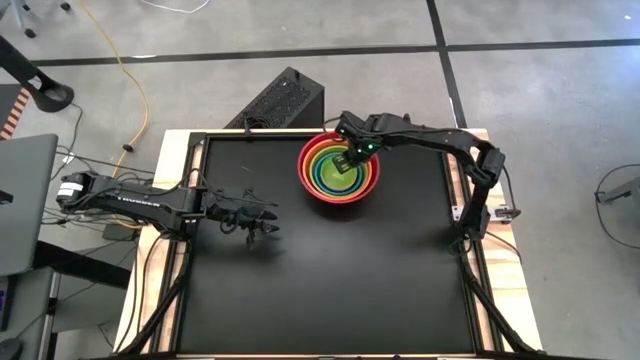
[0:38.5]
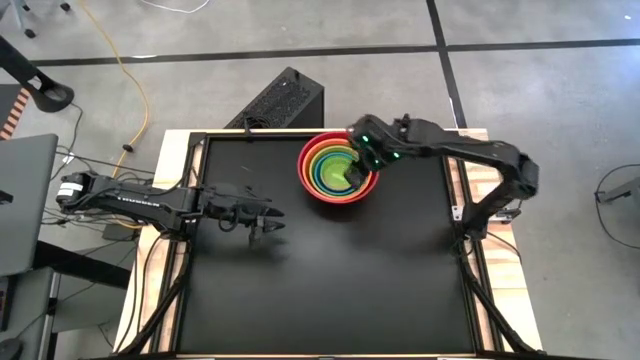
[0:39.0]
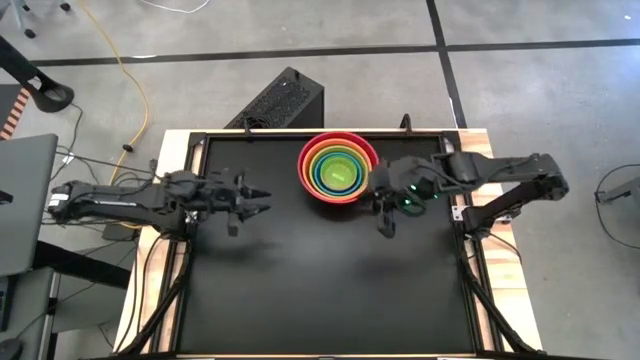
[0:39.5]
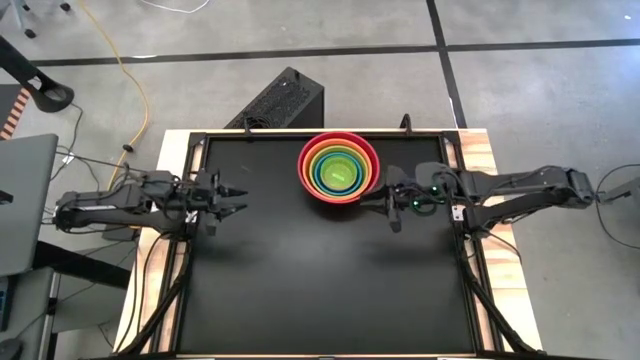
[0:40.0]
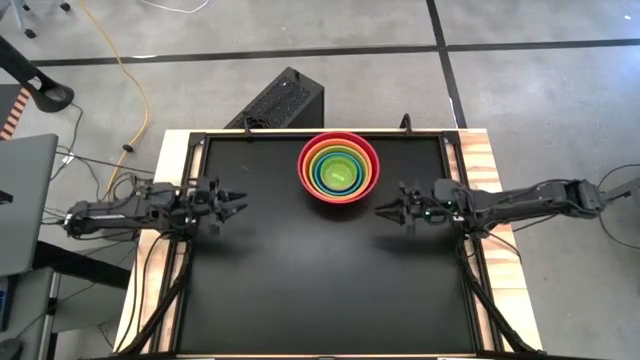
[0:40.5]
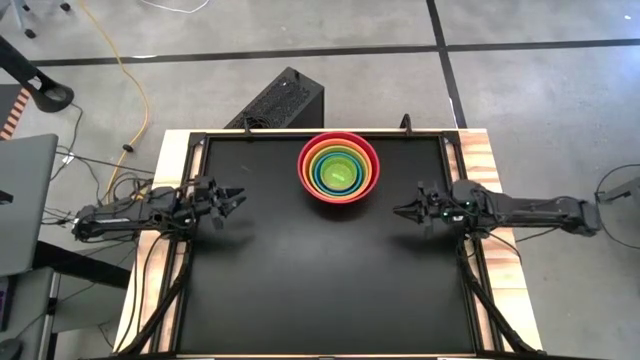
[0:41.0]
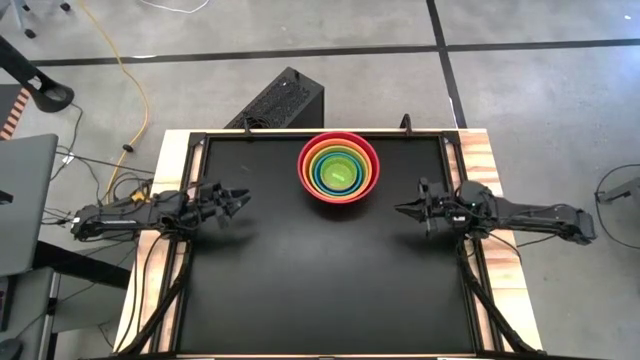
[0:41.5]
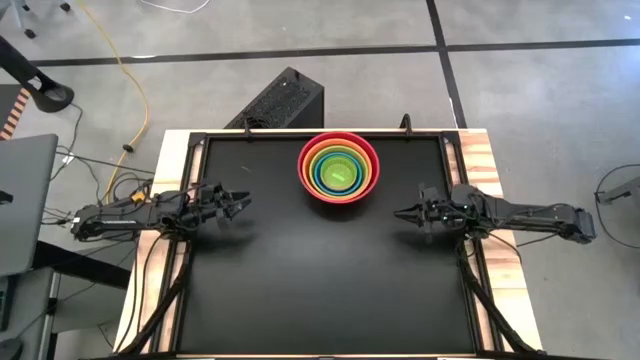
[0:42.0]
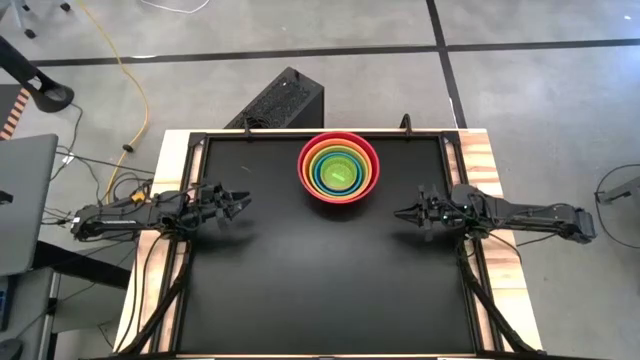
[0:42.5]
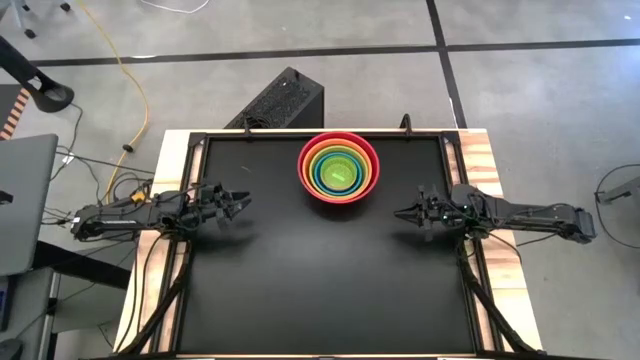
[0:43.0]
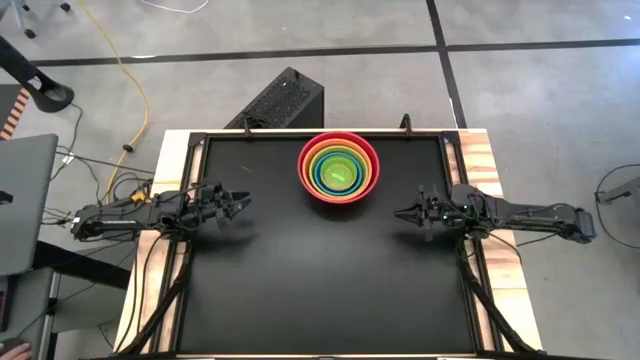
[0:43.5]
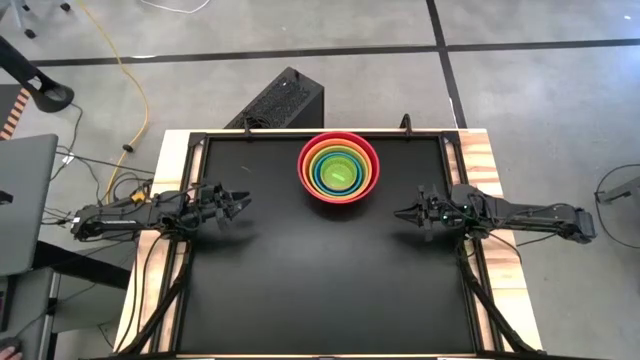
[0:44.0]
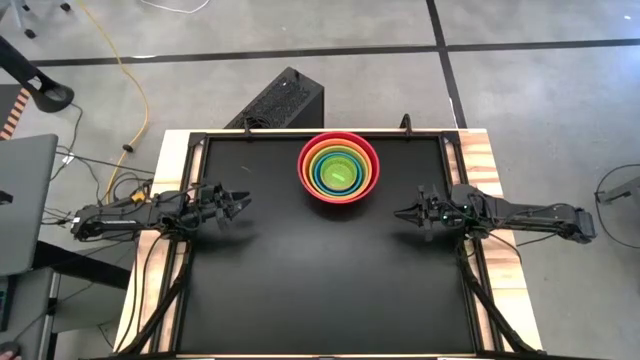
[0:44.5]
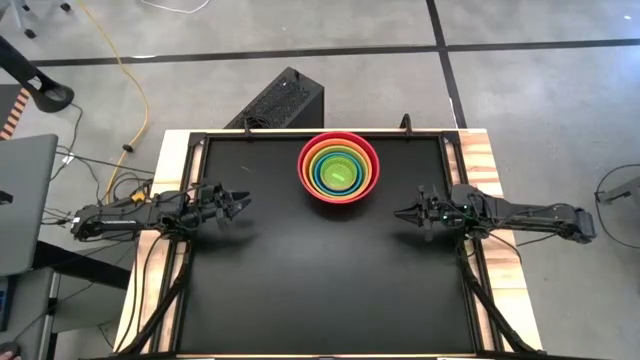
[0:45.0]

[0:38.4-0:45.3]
Return to Home Position

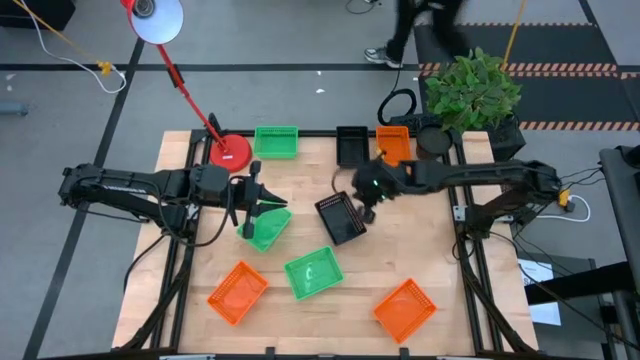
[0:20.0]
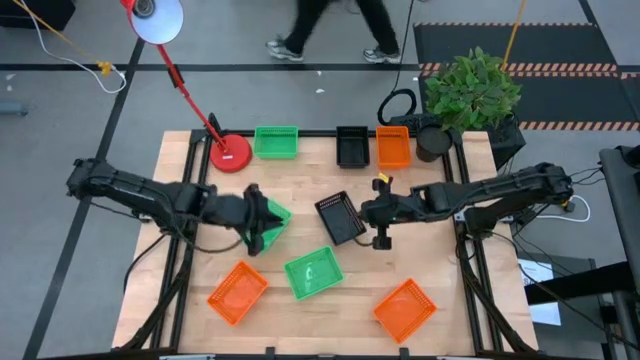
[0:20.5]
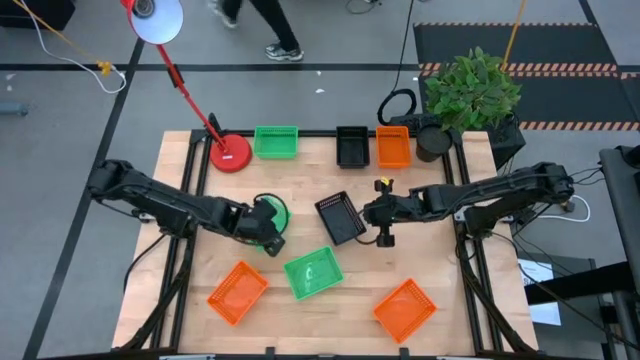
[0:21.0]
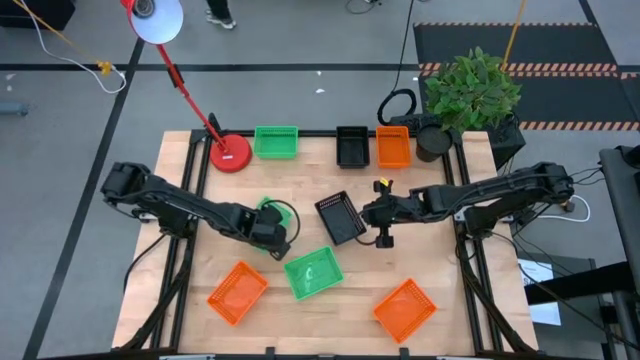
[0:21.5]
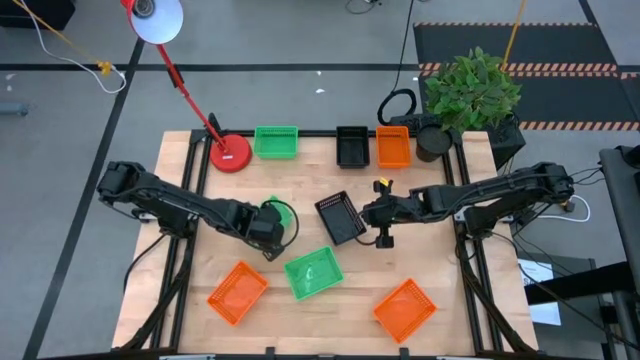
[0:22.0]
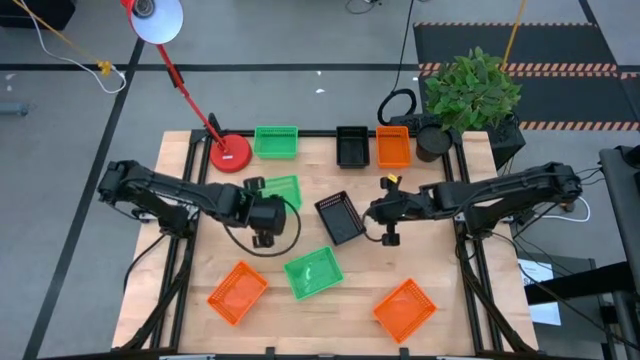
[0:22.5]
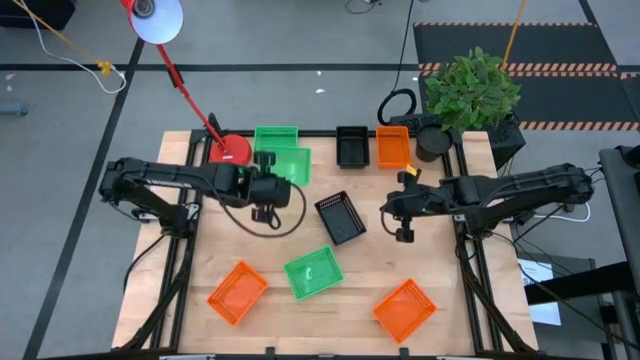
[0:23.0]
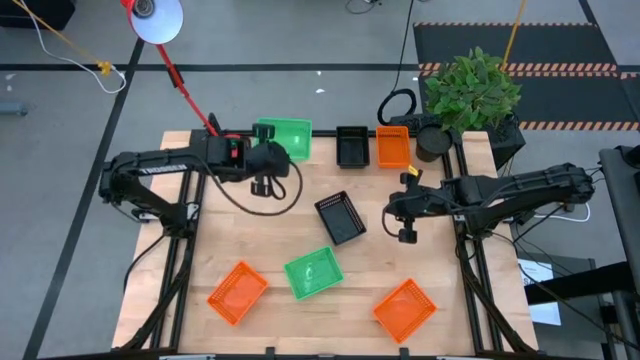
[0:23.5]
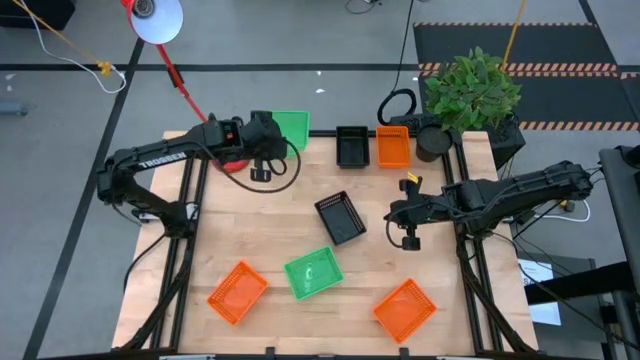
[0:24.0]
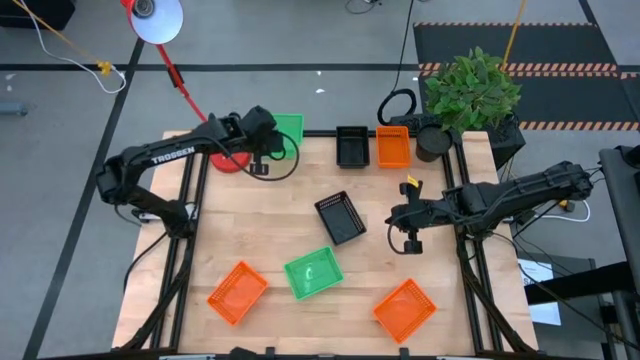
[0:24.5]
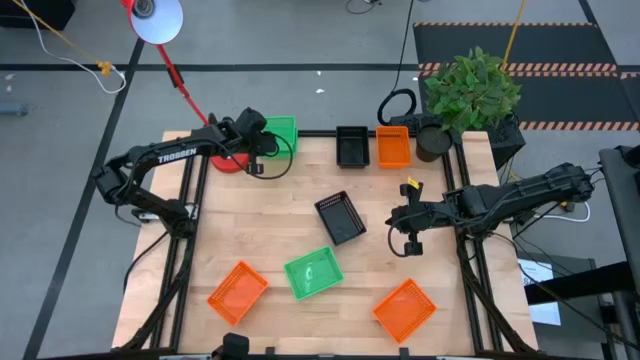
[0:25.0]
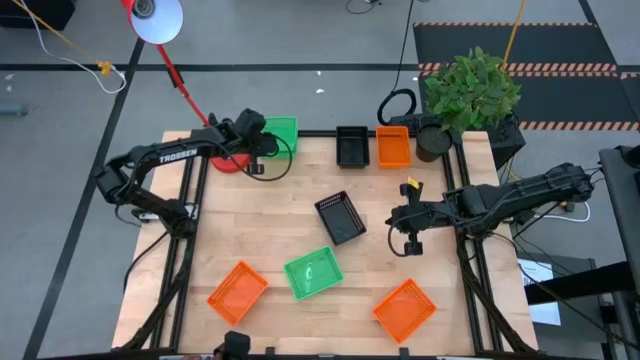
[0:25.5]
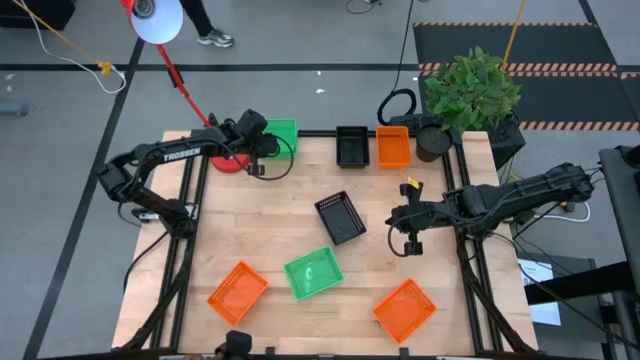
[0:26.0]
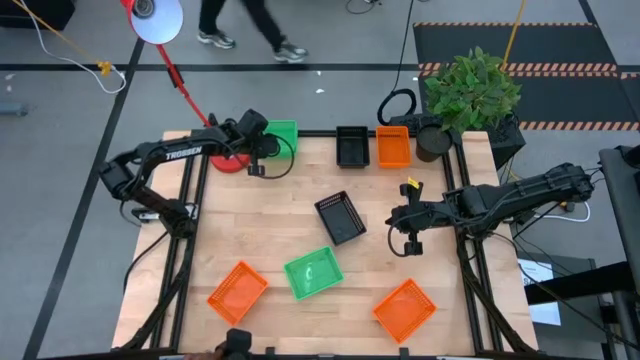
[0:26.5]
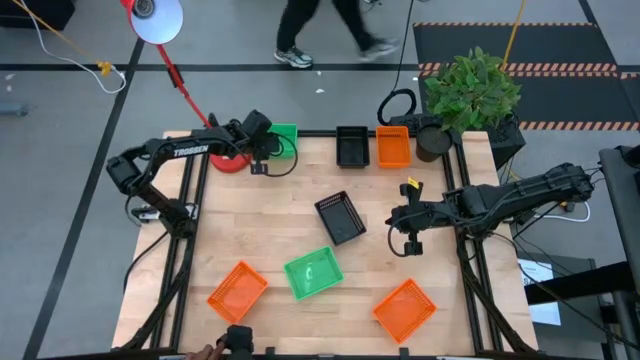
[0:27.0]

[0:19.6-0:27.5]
Stack the middle green bin on the top green bin

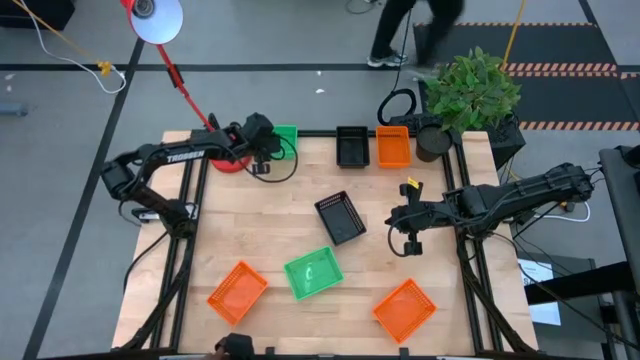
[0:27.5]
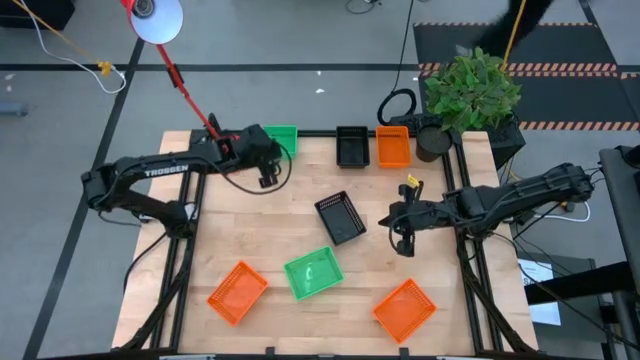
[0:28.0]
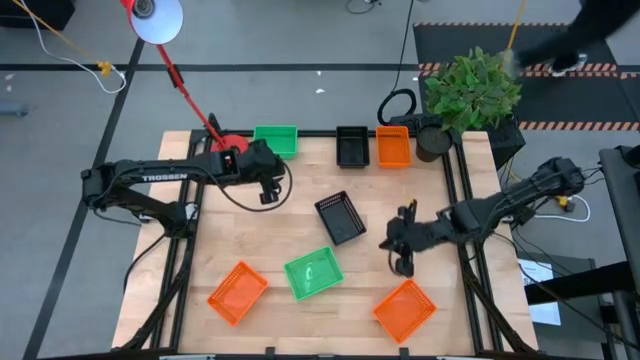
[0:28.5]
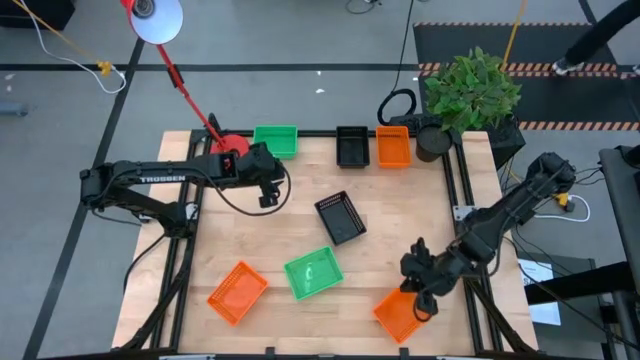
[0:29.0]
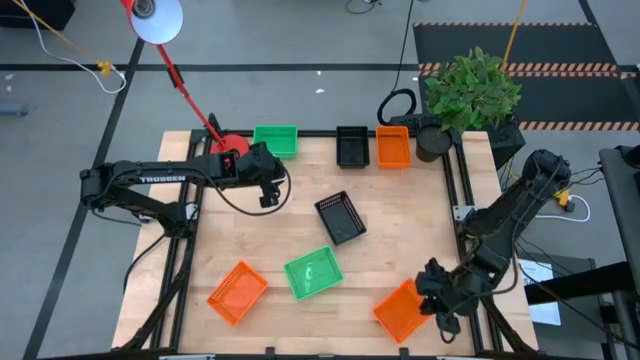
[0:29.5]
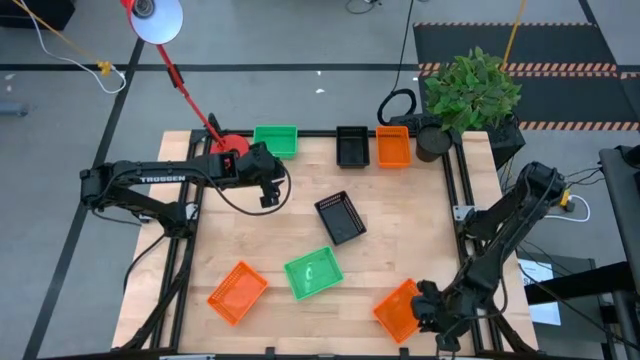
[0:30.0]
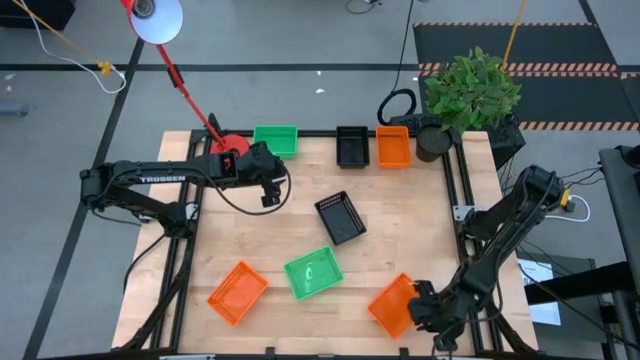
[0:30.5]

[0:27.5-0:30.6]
Stack the bottom right orange bin on the top orange bin
